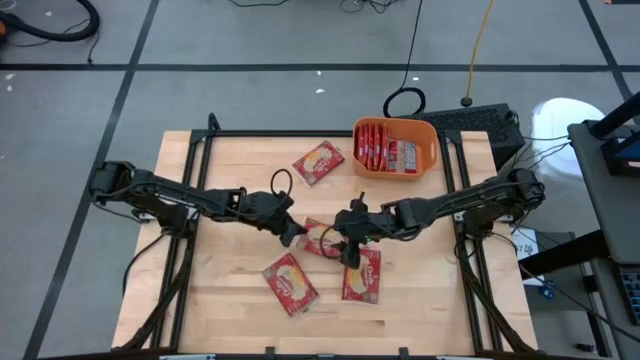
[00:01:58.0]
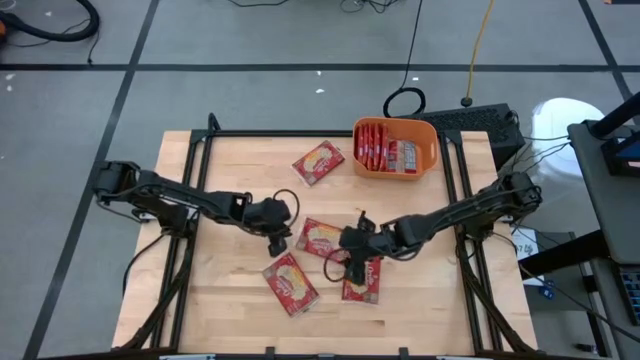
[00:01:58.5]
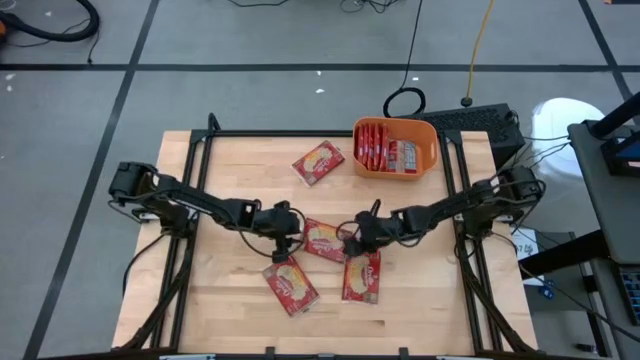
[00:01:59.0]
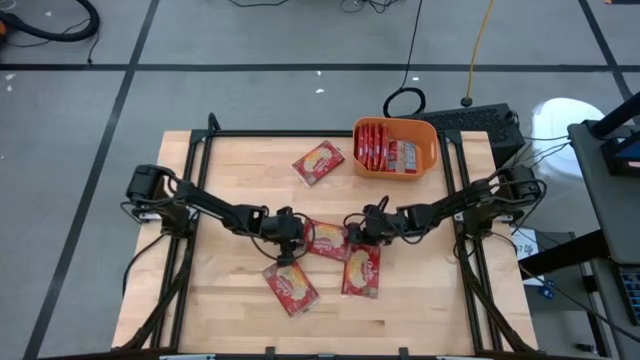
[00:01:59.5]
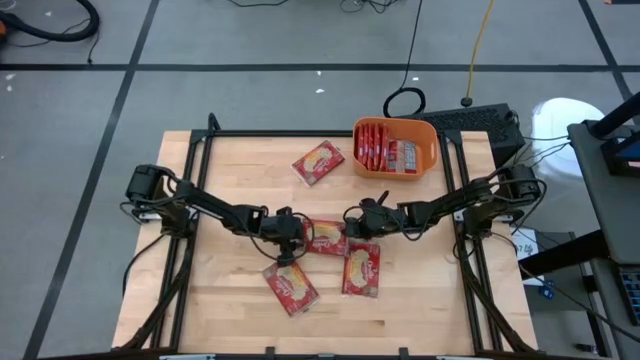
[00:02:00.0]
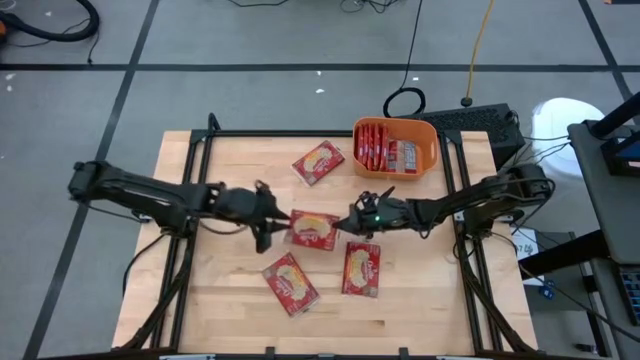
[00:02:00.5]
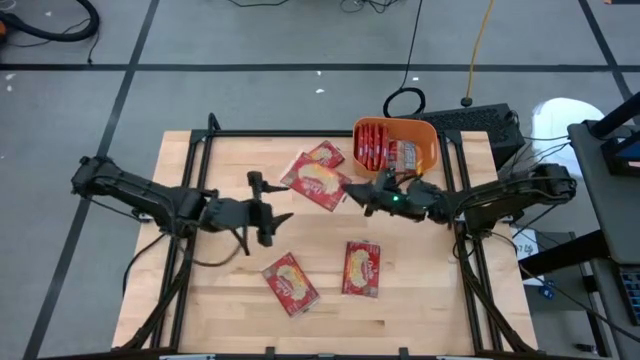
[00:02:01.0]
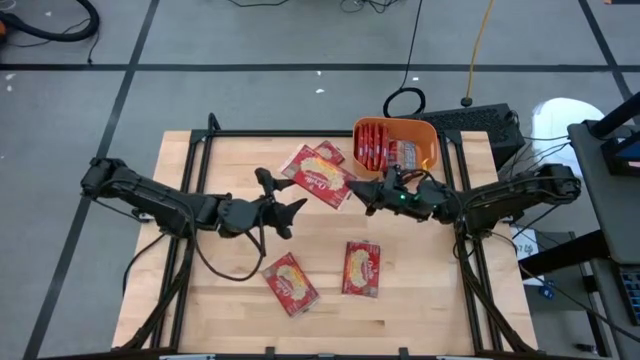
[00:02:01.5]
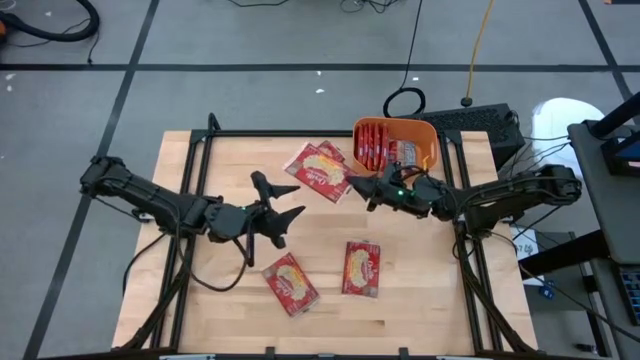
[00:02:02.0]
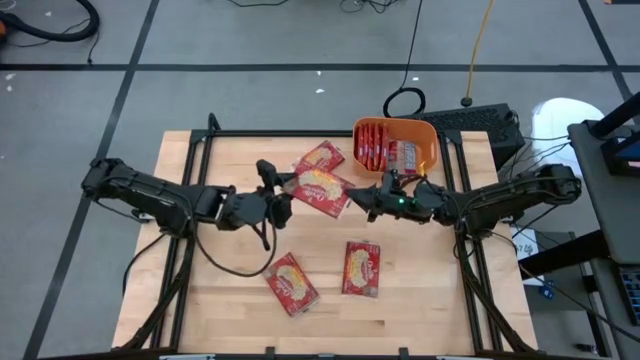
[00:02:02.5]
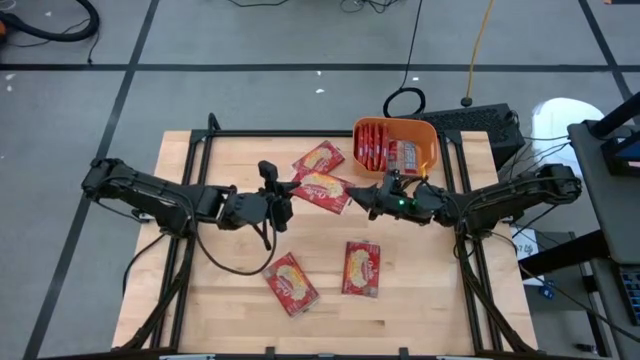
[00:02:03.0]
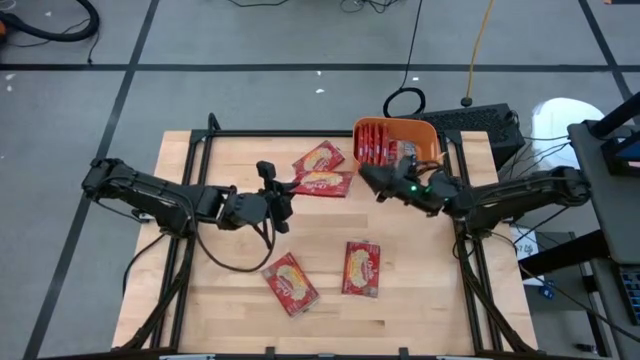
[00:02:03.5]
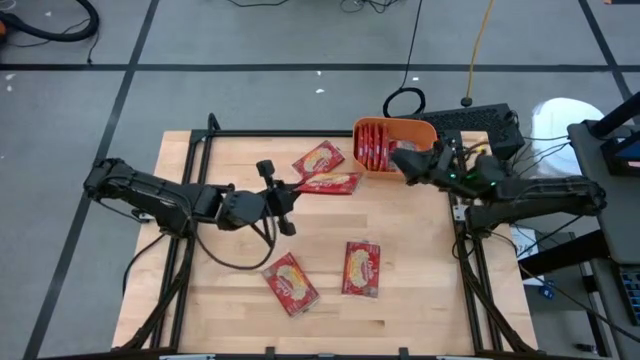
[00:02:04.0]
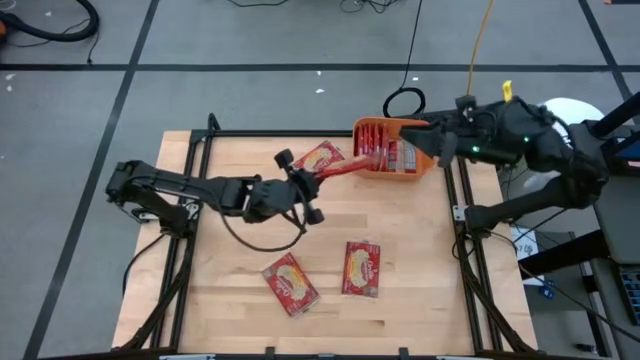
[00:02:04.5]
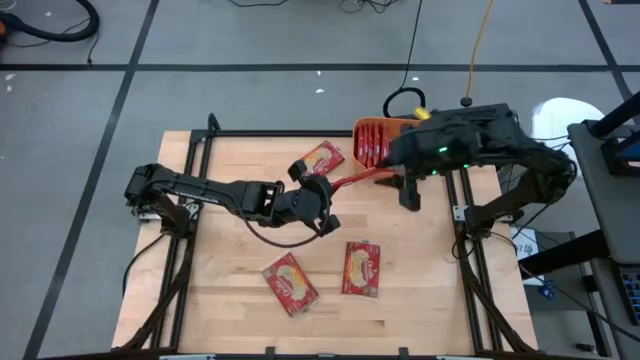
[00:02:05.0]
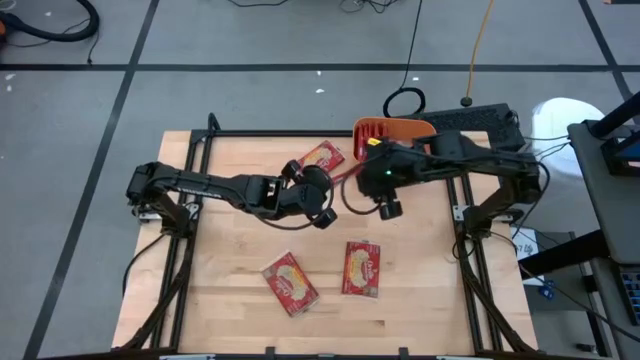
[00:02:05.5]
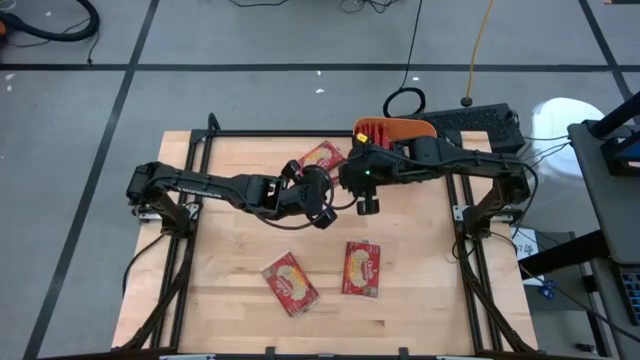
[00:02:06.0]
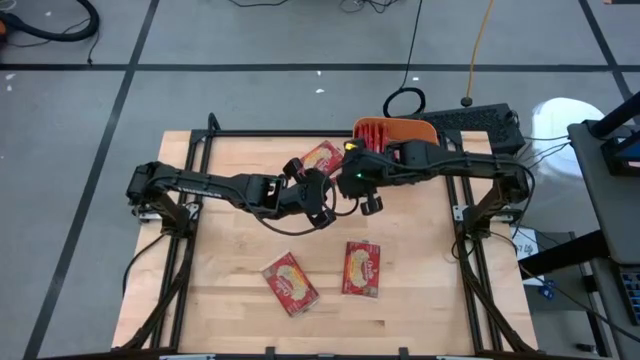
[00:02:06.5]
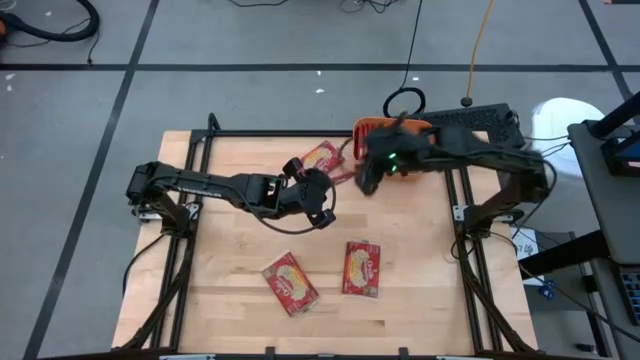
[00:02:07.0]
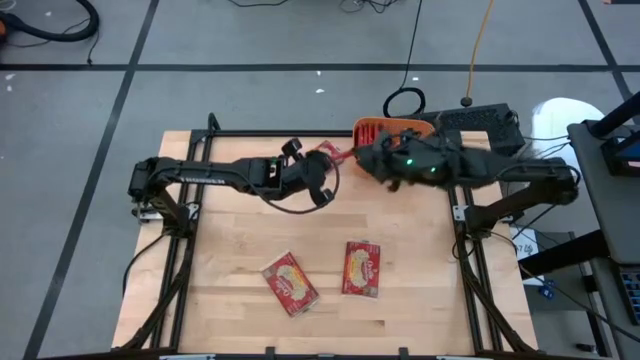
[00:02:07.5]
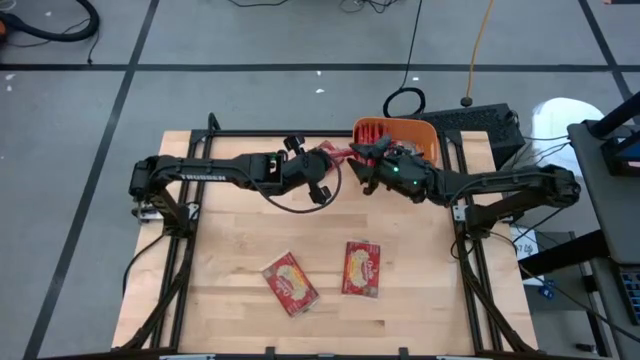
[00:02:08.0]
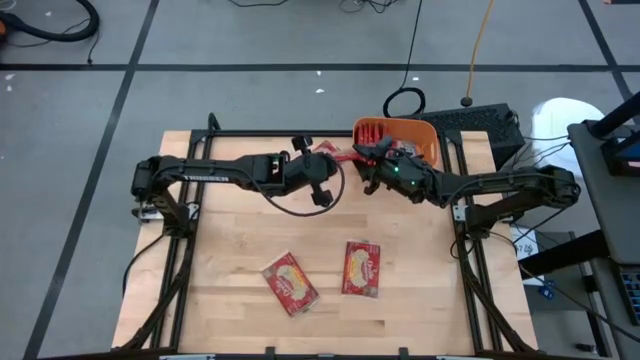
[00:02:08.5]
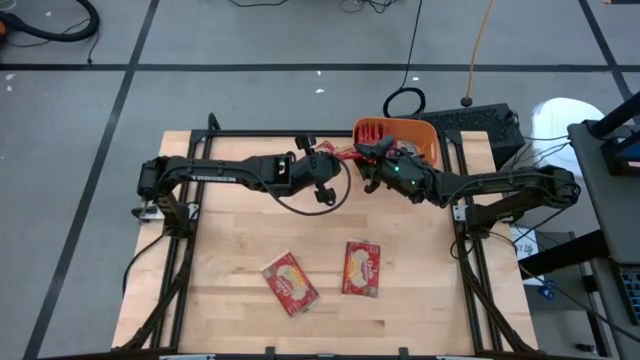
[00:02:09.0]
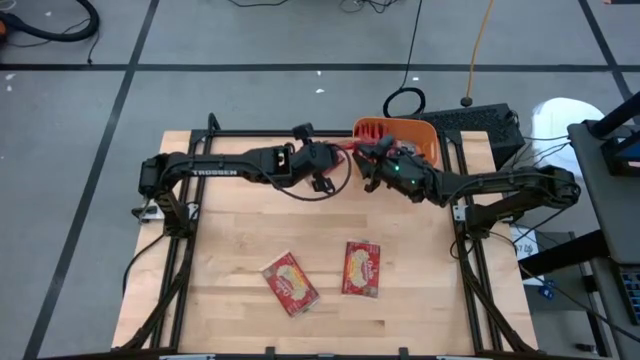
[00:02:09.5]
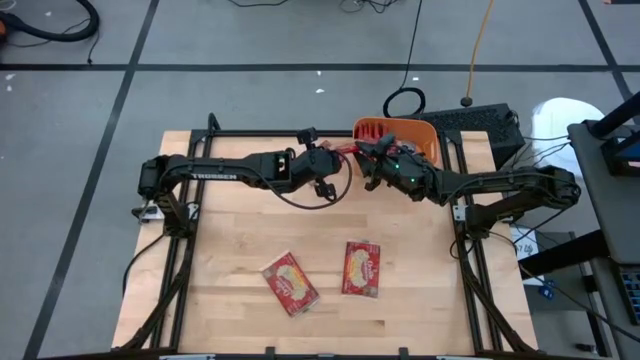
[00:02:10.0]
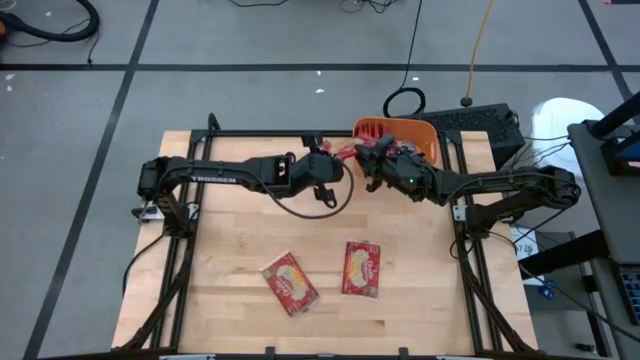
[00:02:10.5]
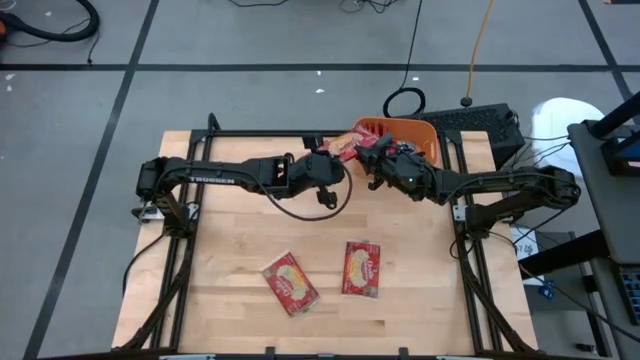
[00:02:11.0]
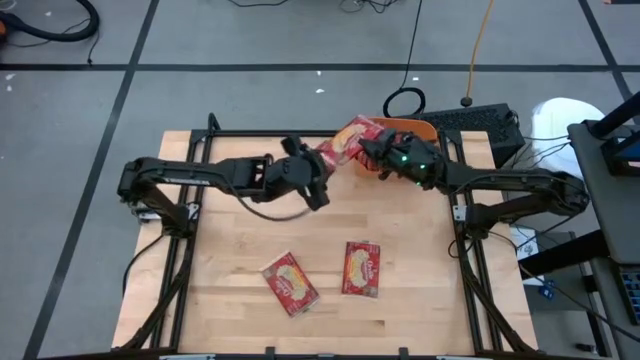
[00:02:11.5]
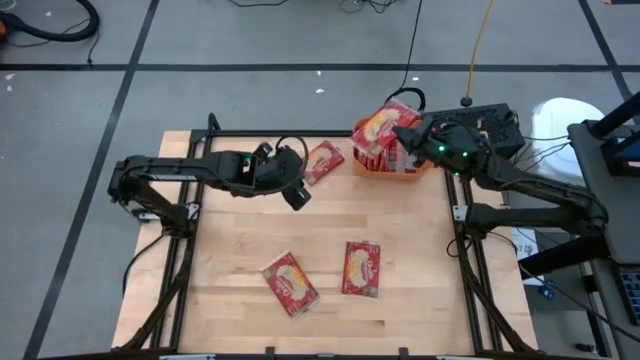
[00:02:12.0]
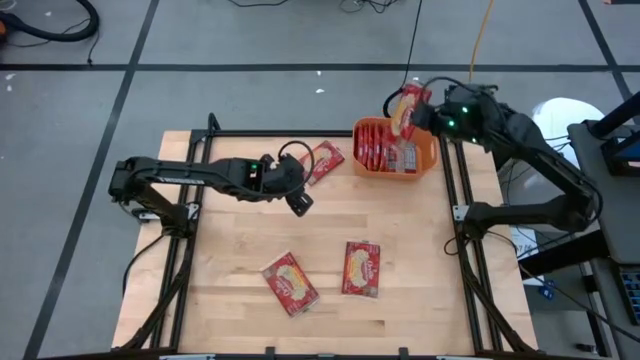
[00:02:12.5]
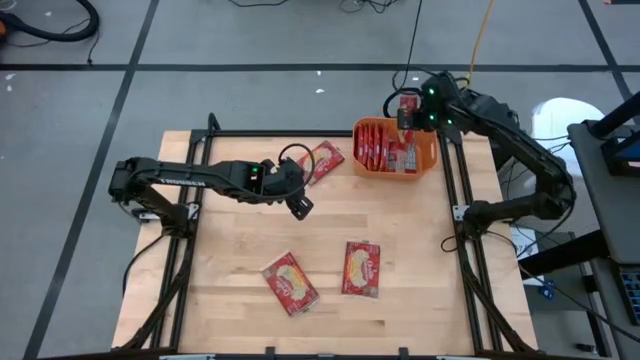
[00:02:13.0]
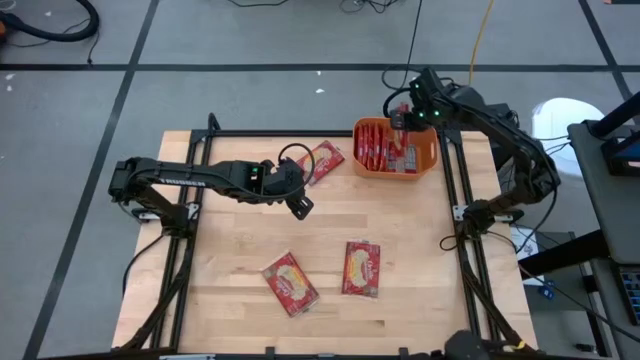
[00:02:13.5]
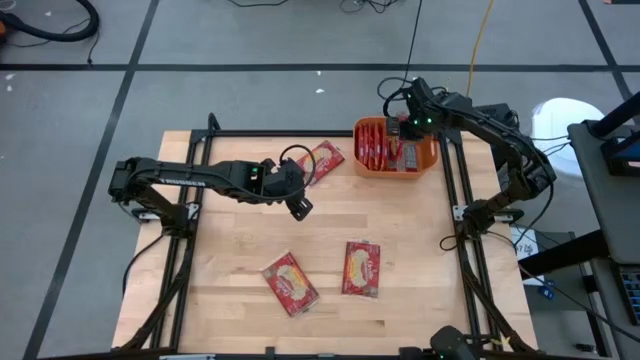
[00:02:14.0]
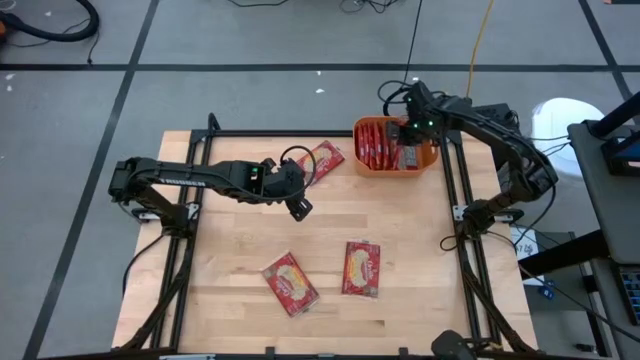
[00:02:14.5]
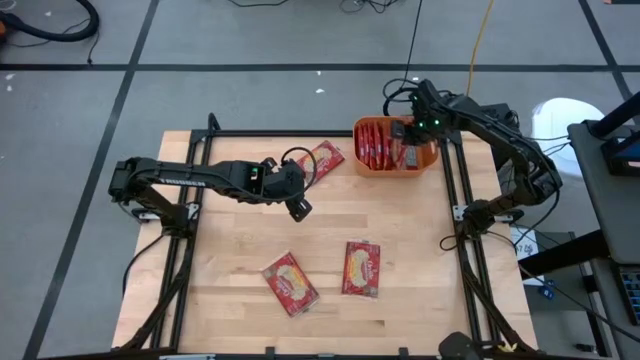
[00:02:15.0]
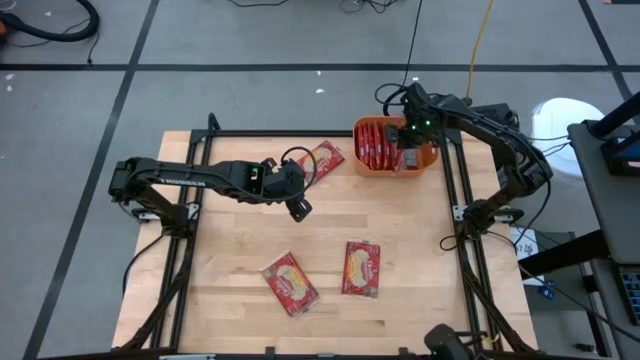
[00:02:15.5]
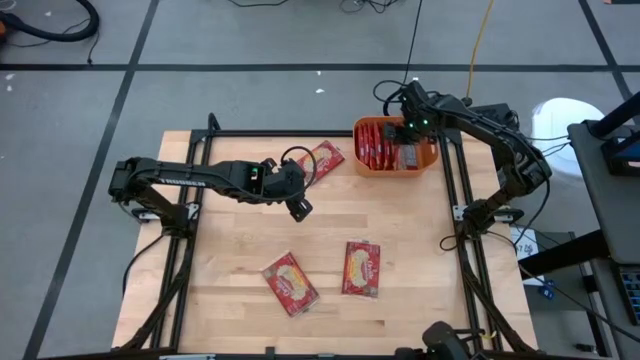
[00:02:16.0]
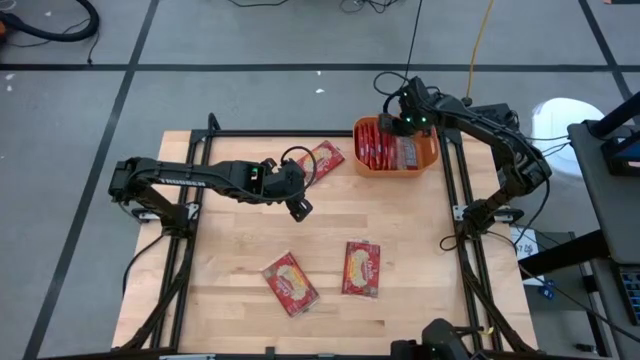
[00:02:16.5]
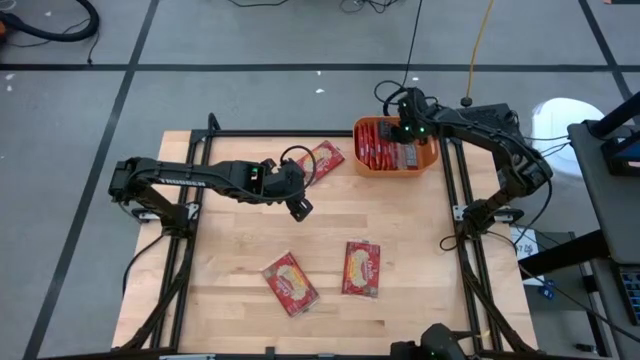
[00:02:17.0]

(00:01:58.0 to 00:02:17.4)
Task: Sort popcorn bags into baskets
Put the red popcorn bag into the orange bin

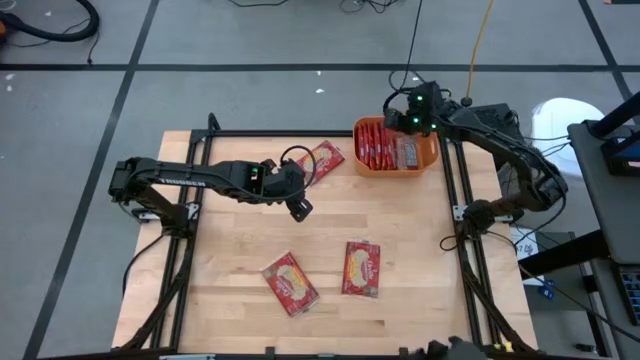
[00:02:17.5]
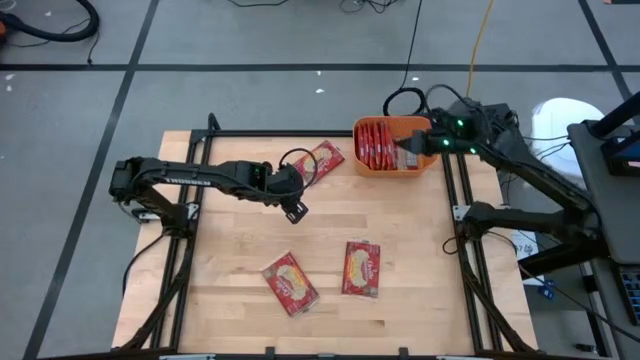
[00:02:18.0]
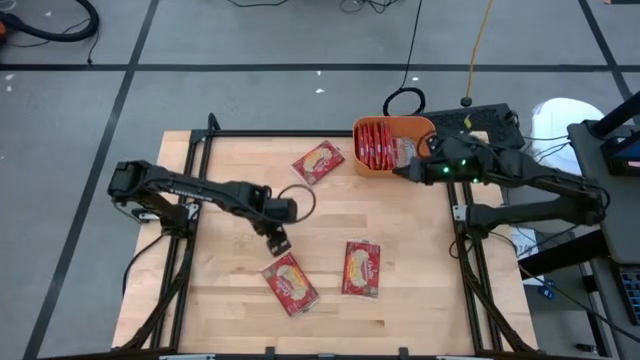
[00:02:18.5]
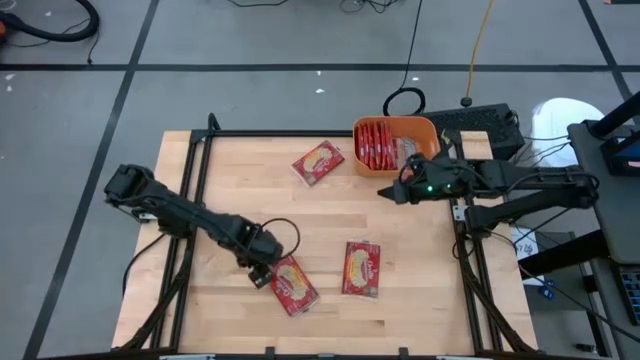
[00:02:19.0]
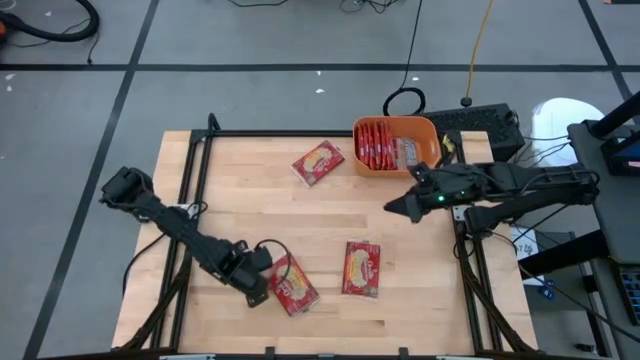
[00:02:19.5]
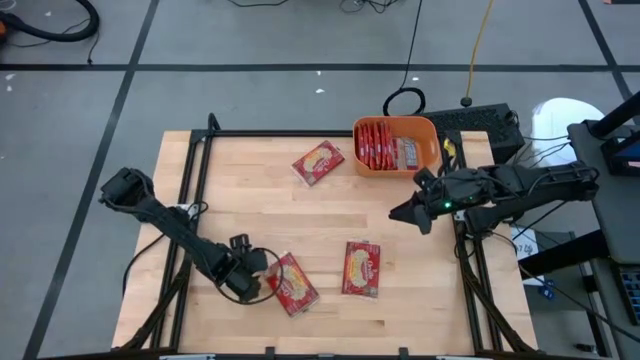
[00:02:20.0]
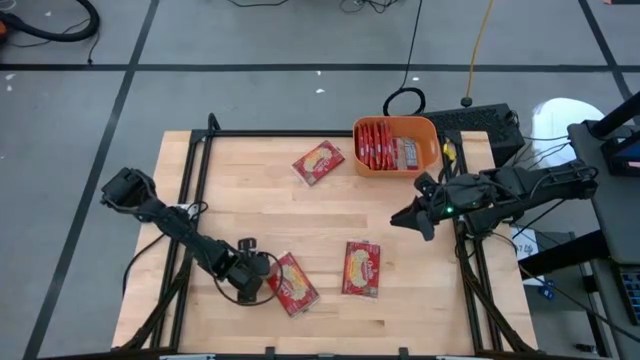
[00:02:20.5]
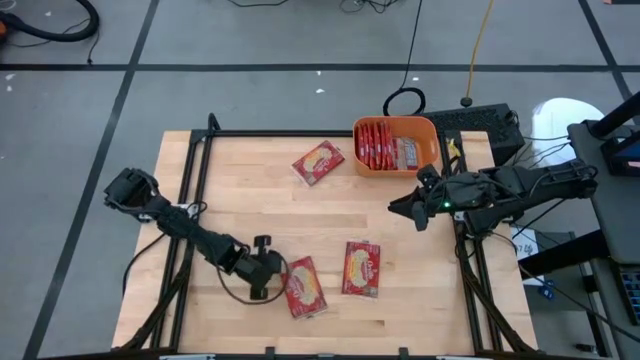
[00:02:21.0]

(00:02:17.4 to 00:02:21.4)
Put the red popcorn bag into the orange bin
